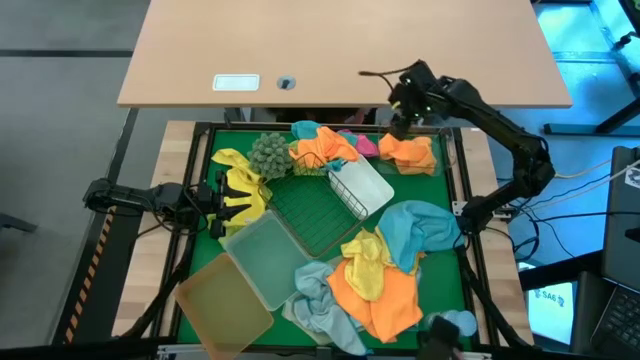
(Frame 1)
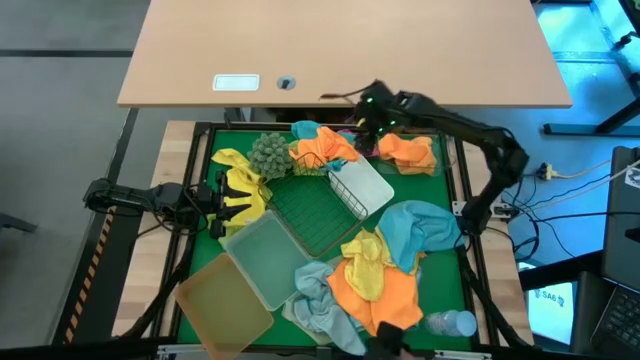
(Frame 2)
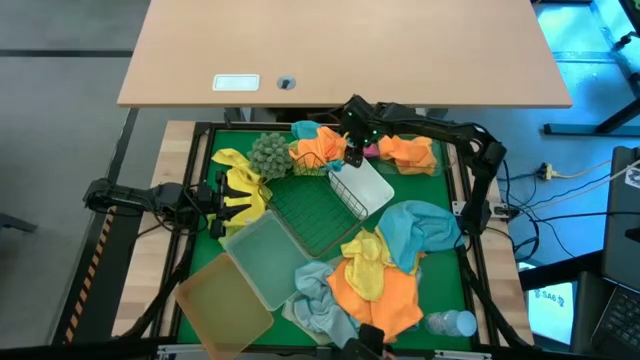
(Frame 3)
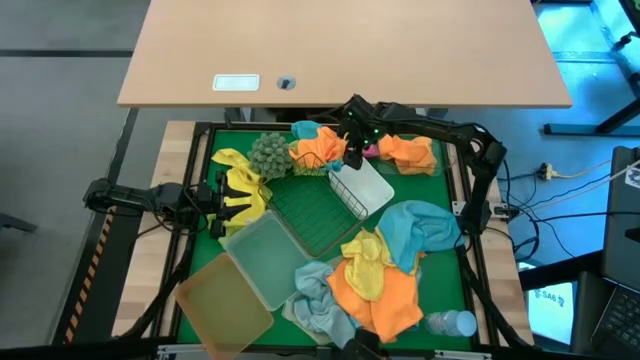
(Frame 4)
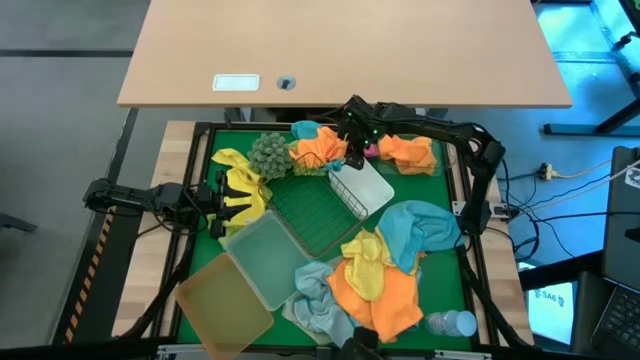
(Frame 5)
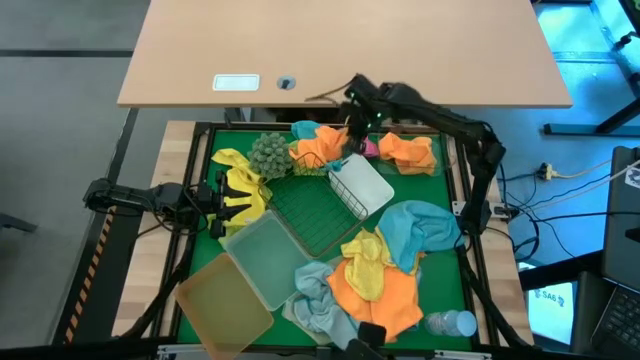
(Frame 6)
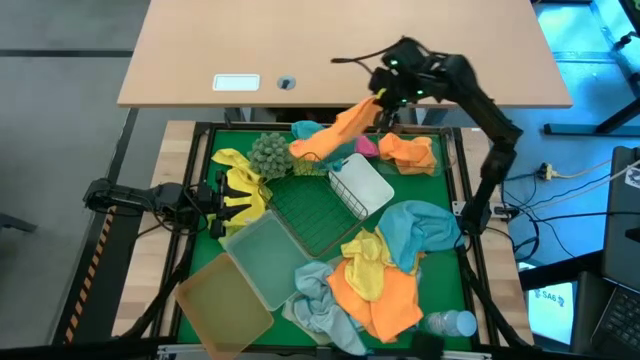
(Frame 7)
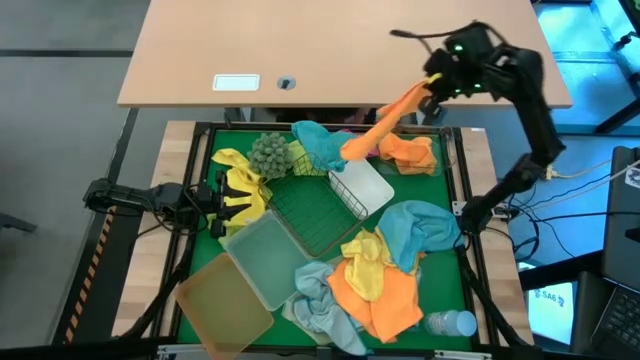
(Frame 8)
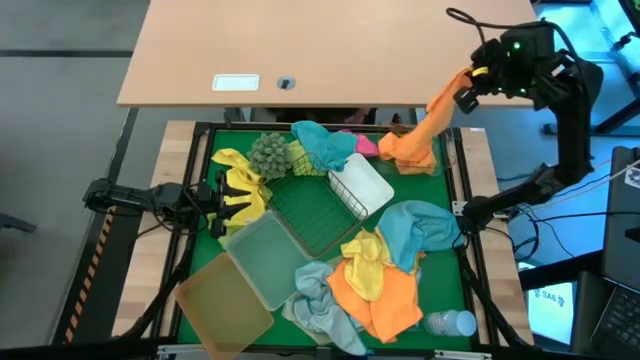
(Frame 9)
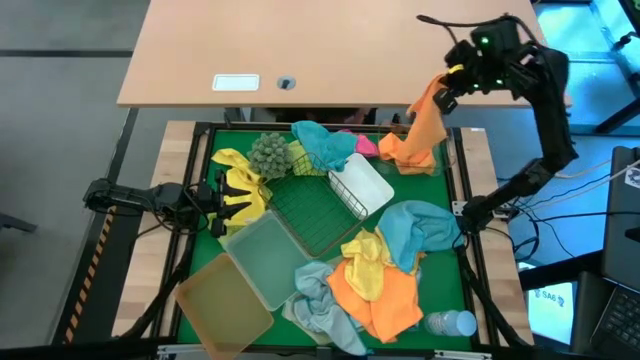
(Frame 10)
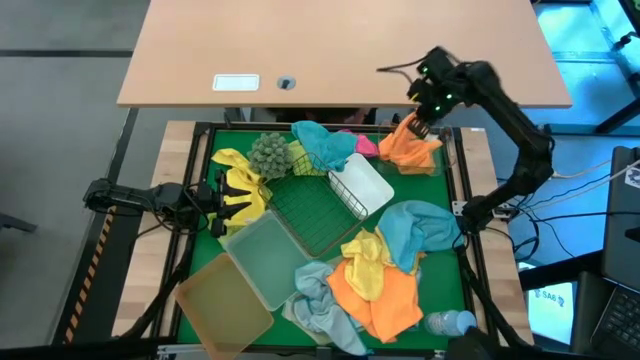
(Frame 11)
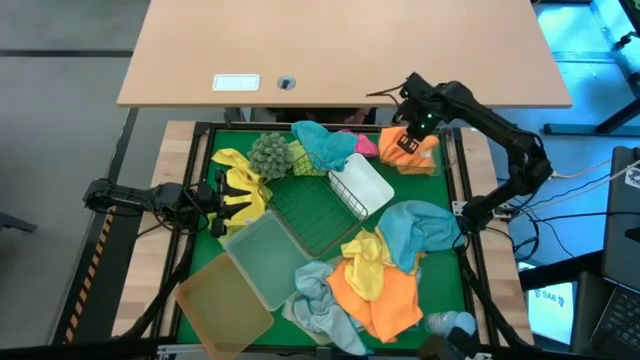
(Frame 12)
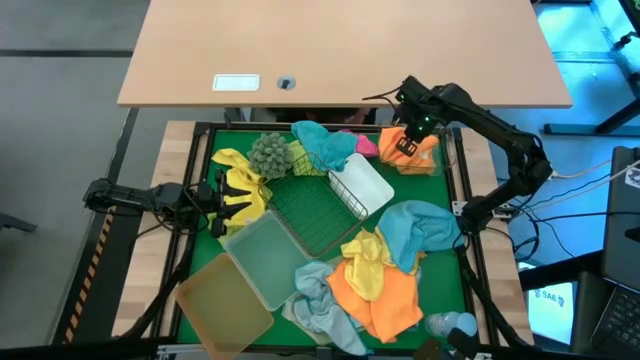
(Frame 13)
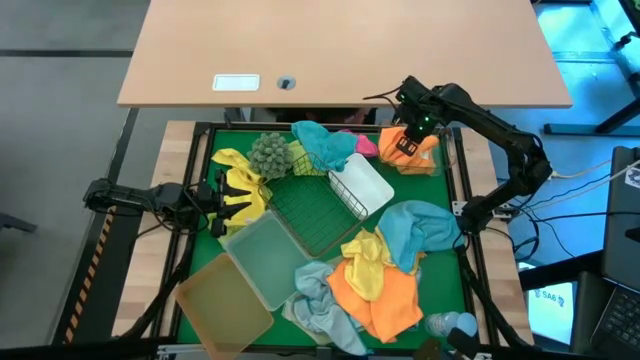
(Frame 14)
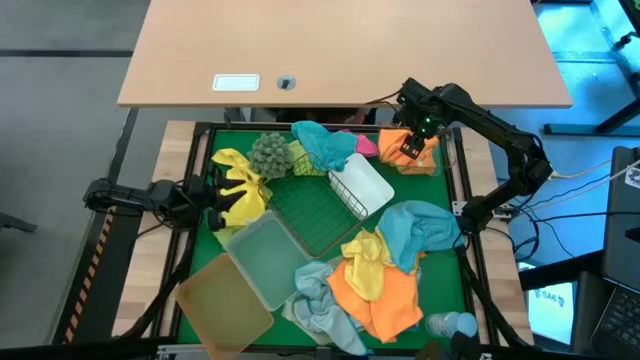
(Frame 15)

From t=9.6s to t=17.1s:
Task: Sort microfiber towel by color & place in baskets
Put the orange towel into the transparent bin

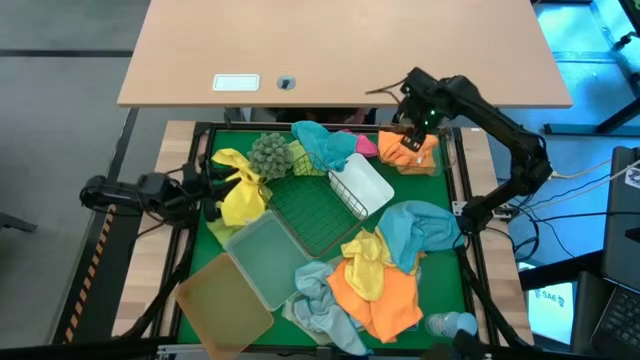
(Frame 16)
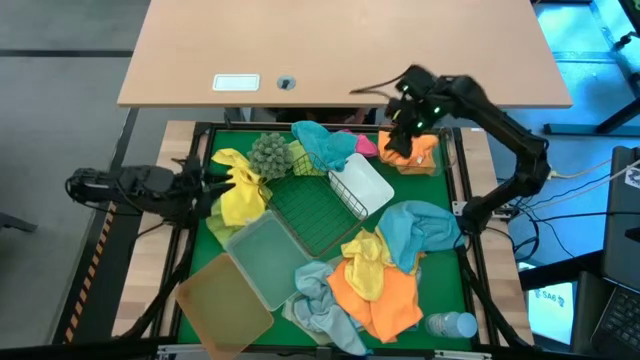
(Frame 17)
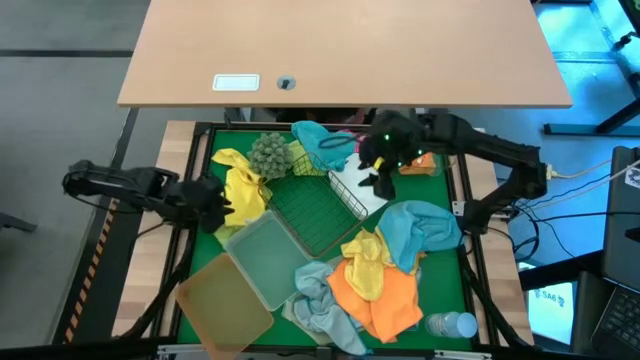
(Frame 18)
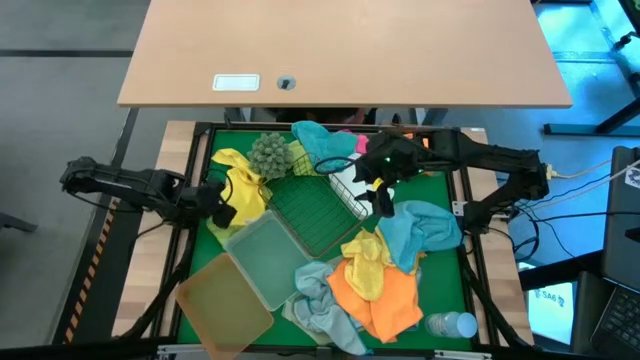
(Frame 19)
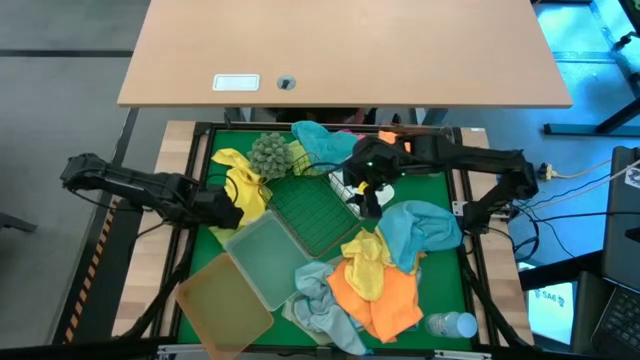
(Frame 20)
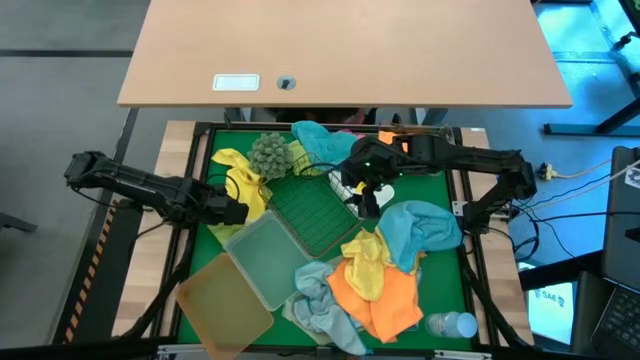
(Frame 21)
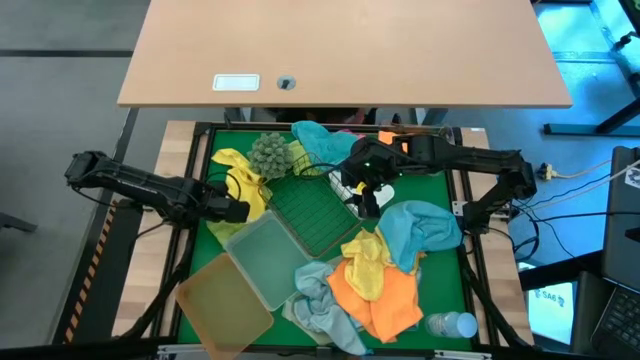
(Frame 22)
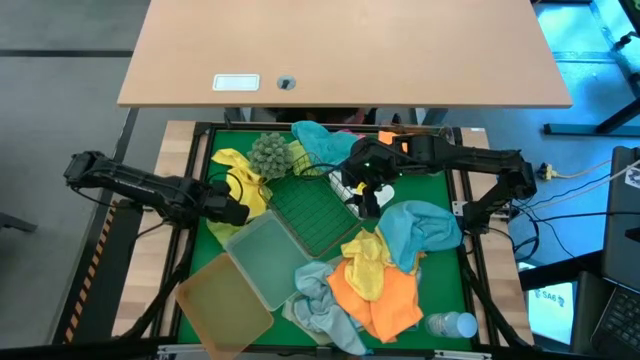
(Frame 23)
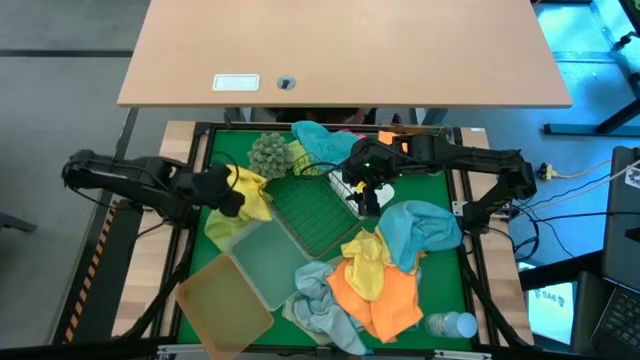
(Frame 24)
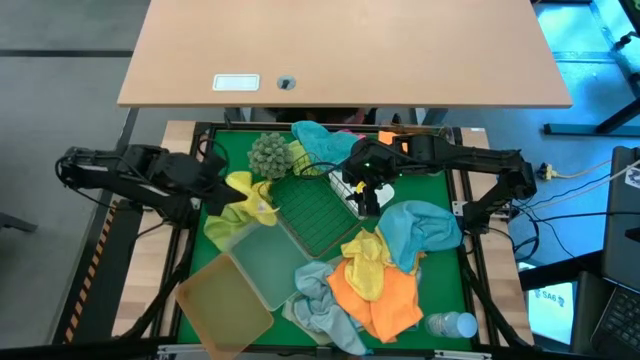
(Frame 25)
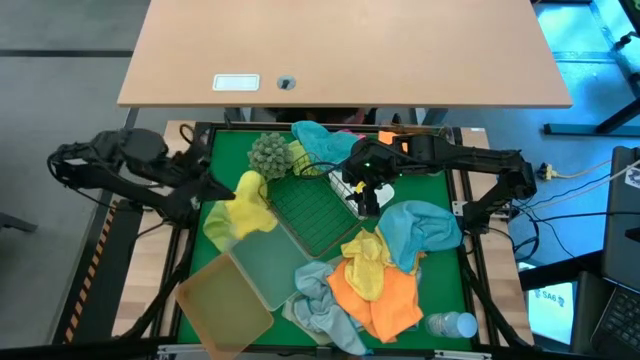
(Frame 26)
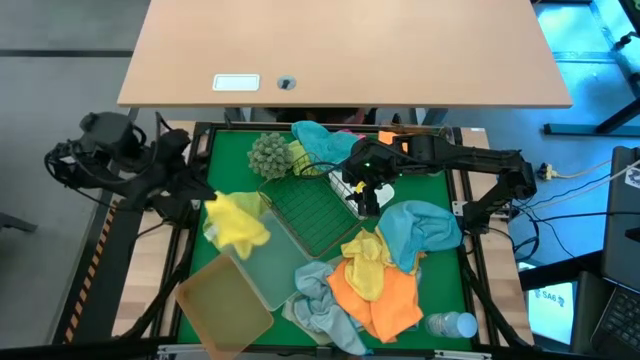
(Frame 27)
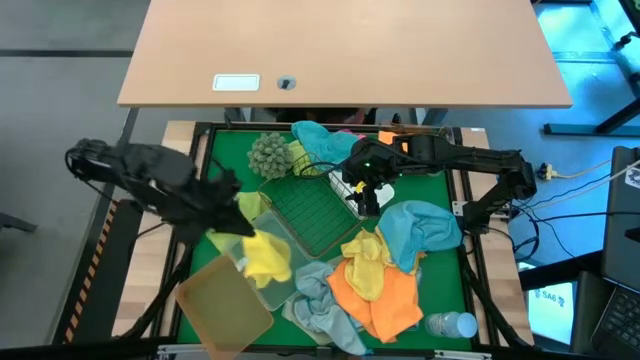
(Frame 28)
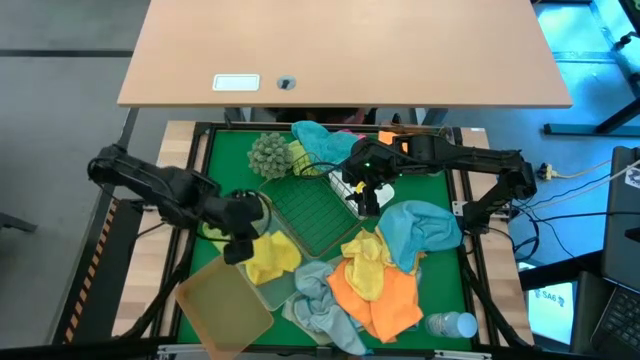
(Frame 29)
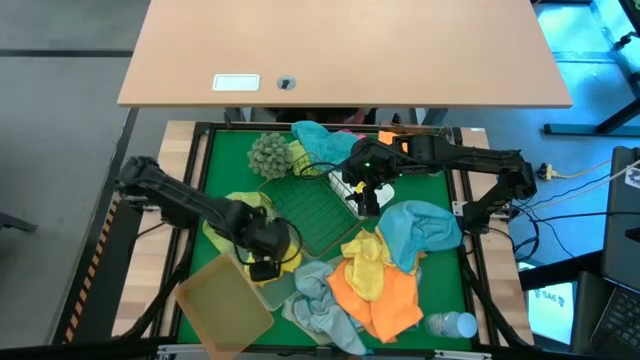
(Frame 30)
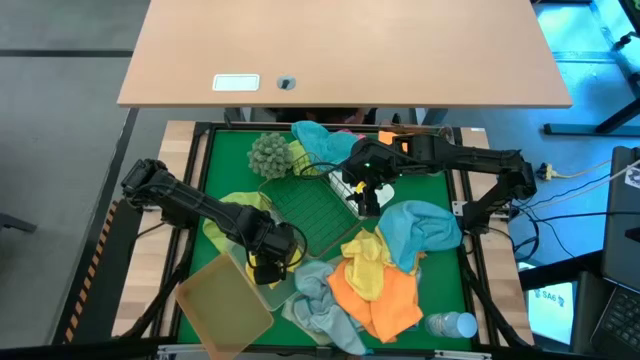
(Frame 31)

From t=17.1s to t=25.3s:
Put the yellow towel into the gray bin

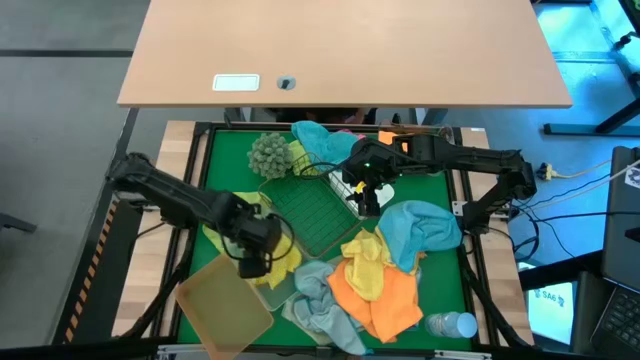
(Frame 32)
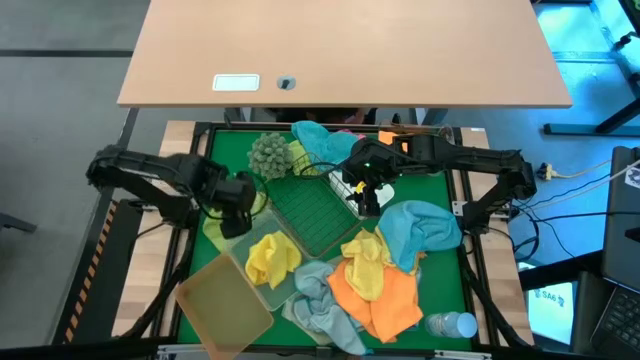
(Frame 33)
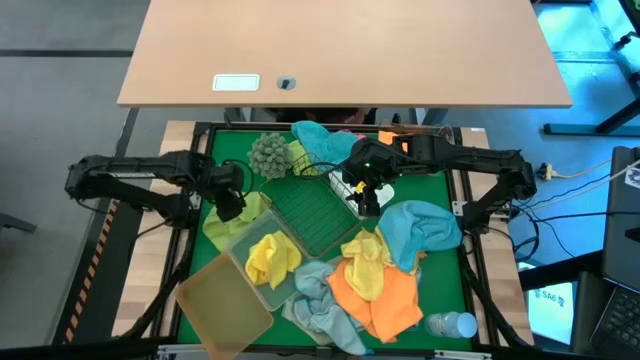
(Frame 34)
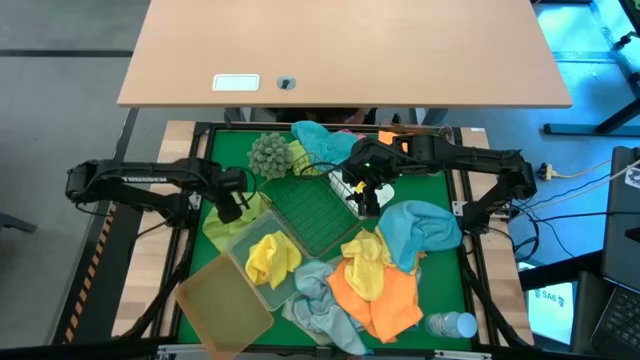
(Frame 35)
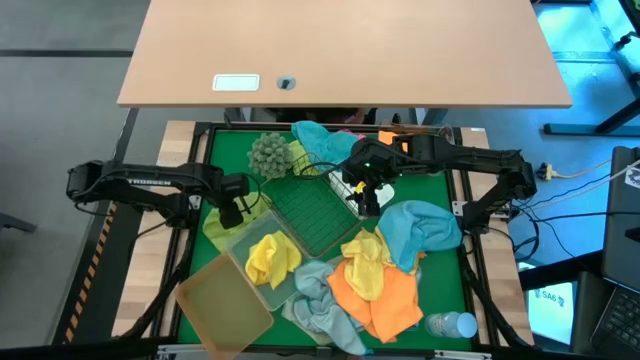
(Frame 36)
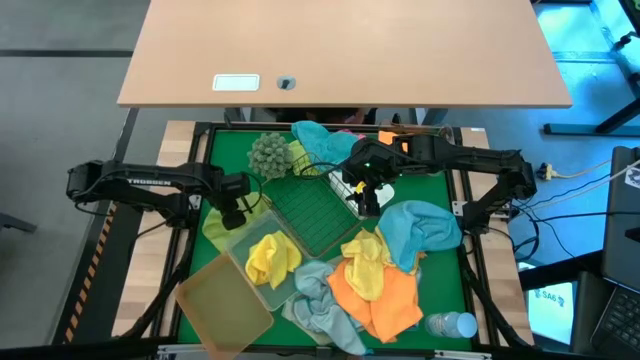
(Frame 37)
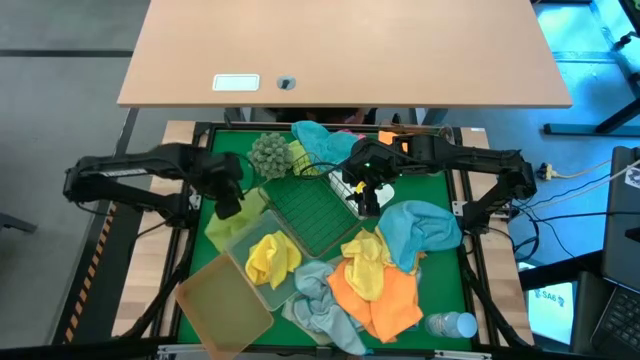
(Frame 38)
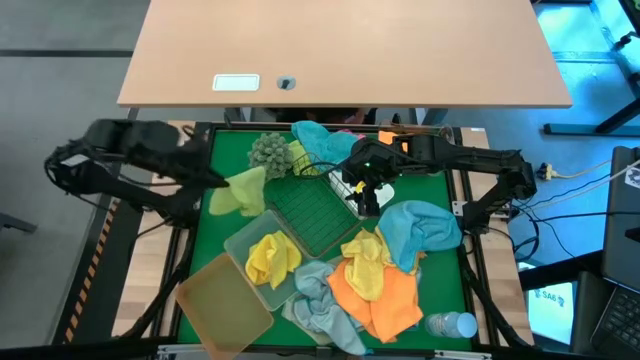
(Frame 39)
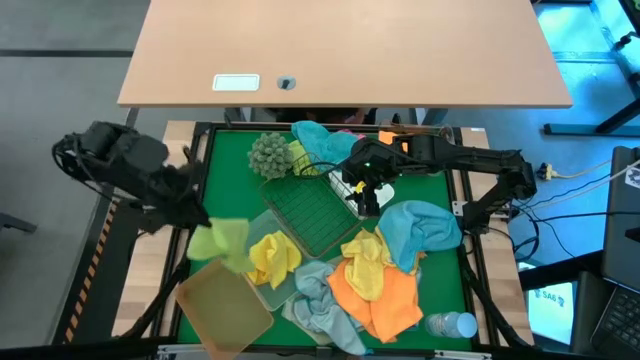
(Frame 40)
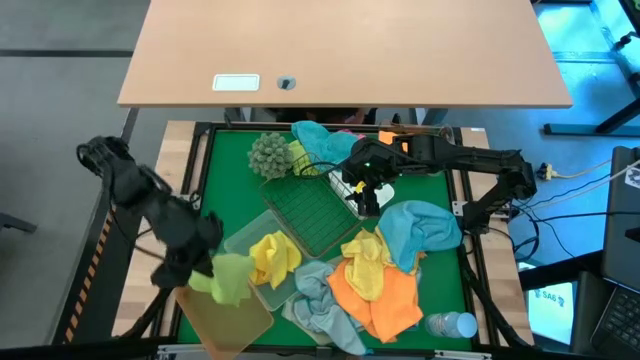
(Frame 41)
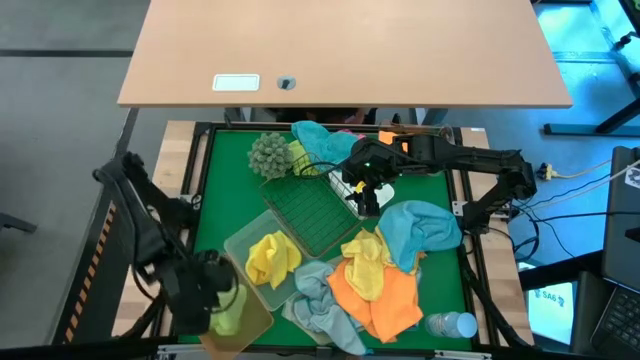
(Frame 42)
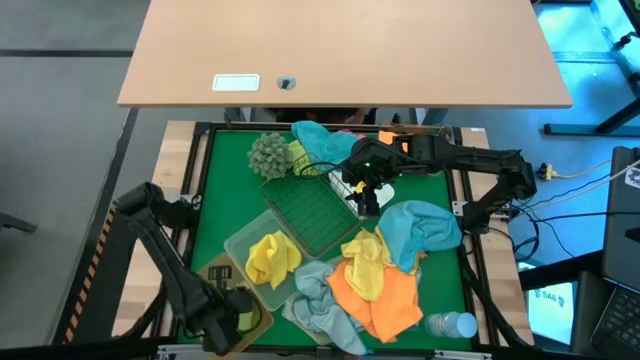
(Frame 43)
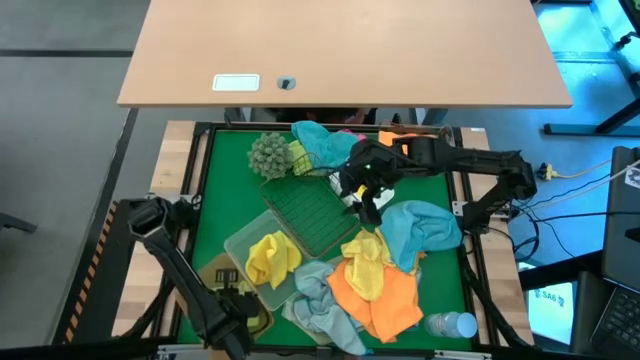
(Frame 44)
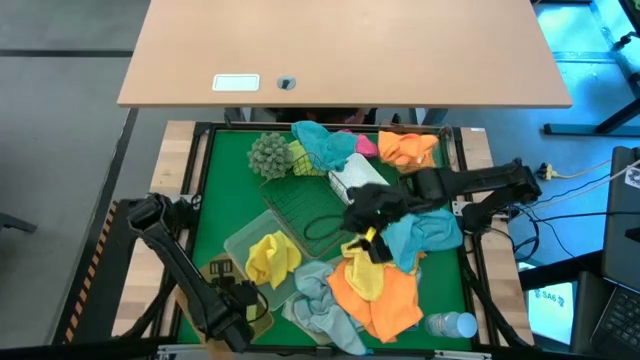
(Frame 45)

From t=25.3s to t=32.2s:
Put the green towel into the orange bin
